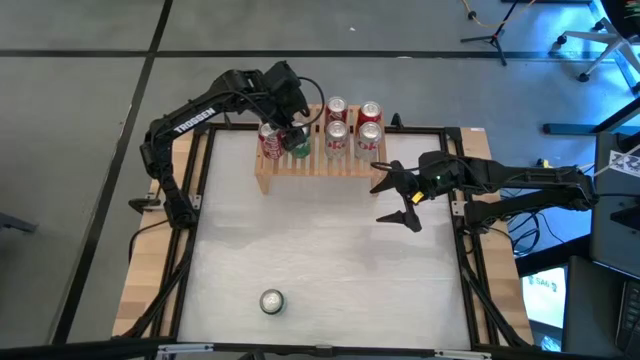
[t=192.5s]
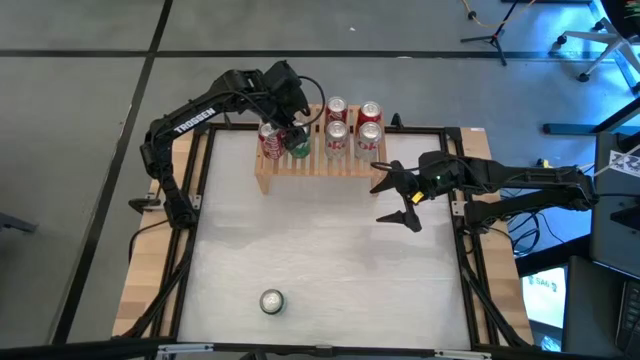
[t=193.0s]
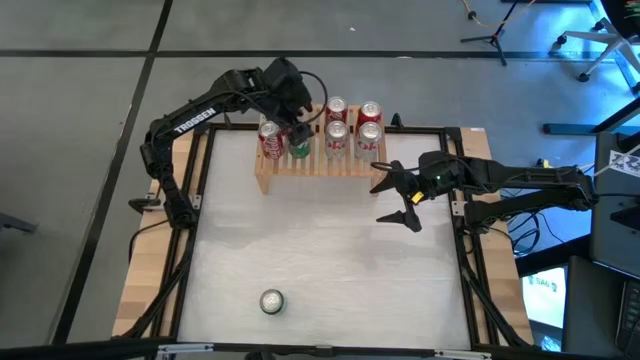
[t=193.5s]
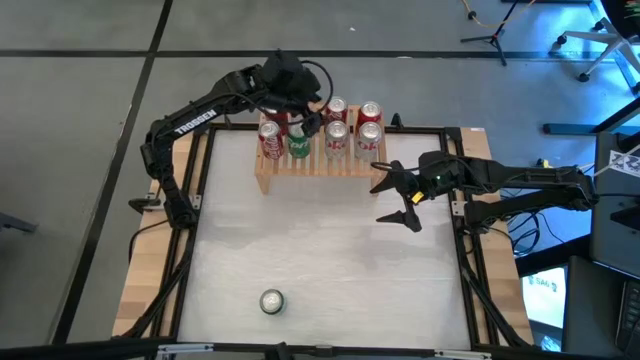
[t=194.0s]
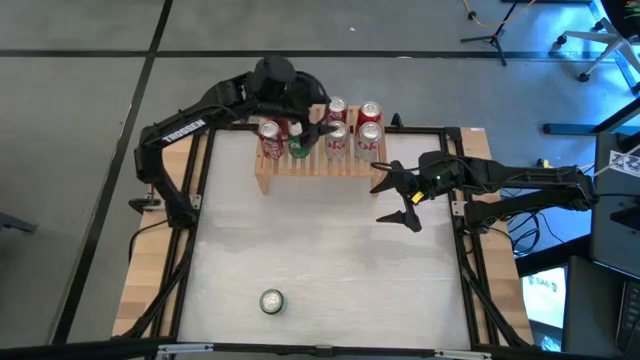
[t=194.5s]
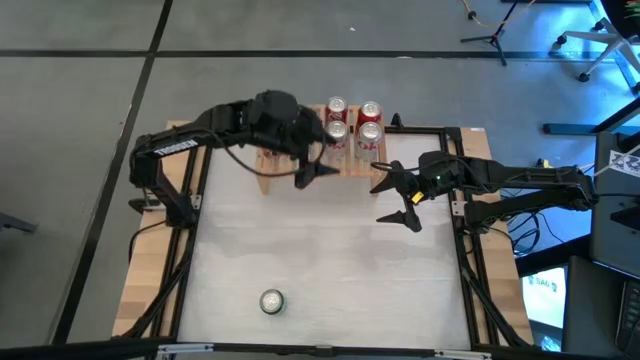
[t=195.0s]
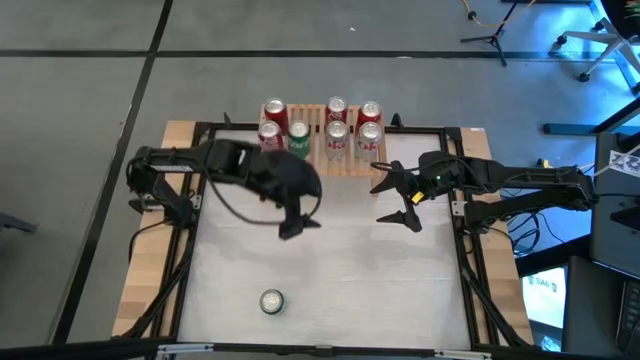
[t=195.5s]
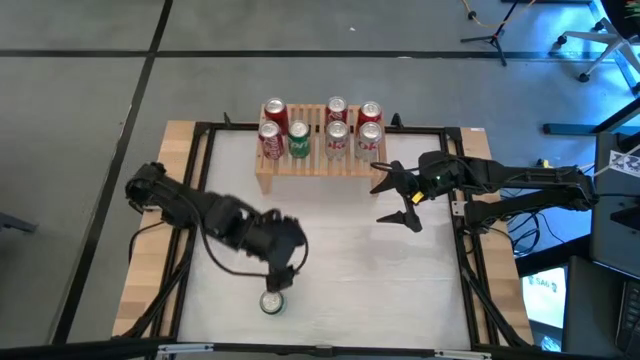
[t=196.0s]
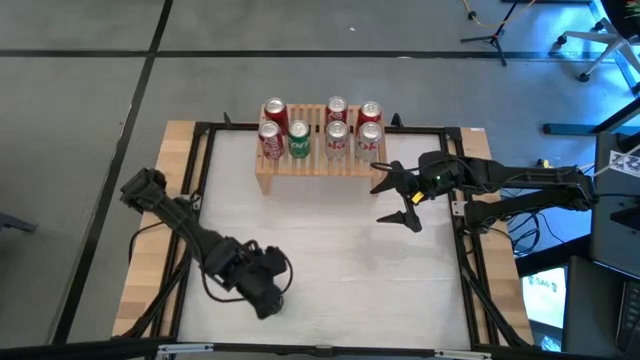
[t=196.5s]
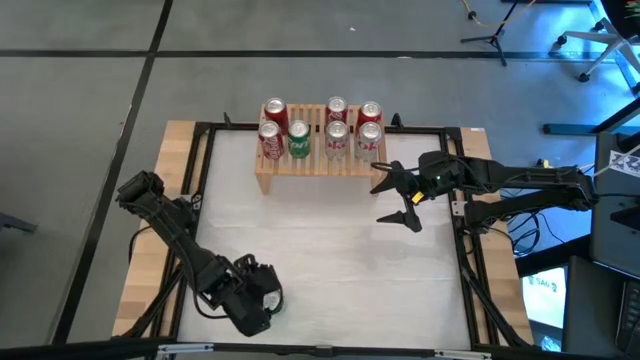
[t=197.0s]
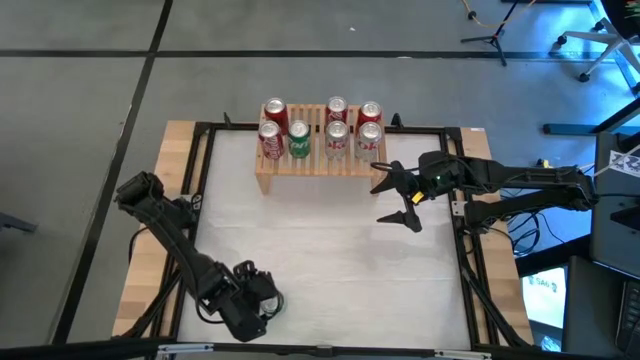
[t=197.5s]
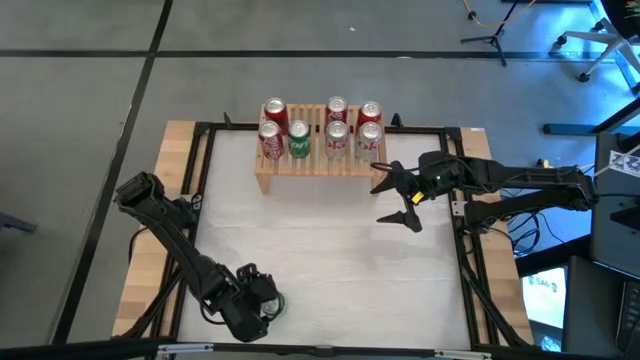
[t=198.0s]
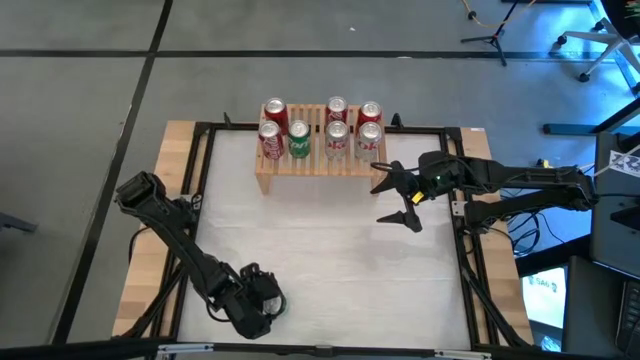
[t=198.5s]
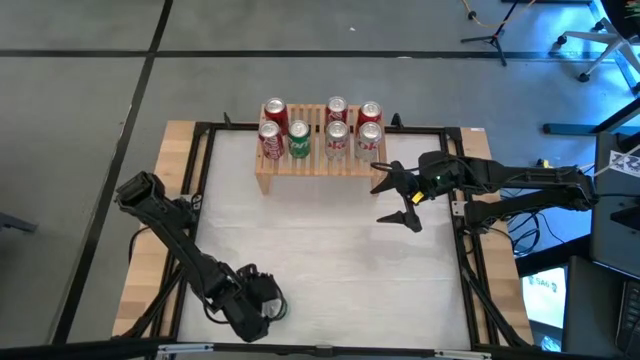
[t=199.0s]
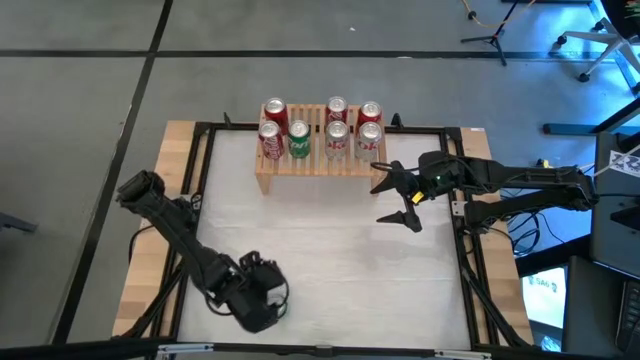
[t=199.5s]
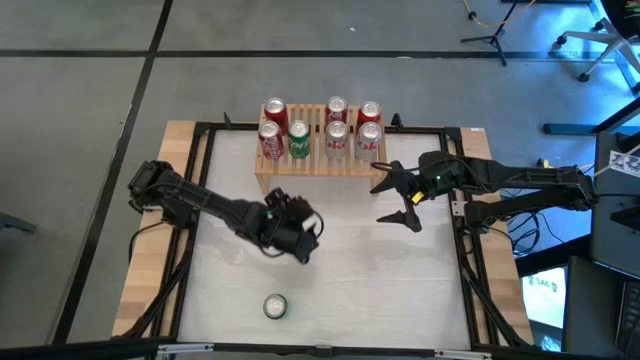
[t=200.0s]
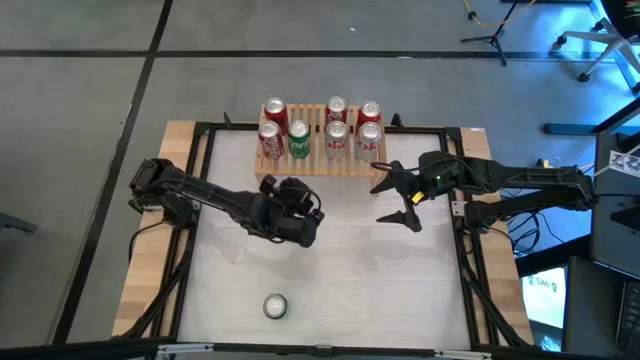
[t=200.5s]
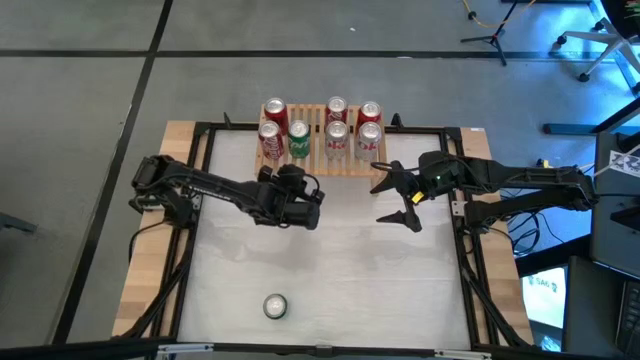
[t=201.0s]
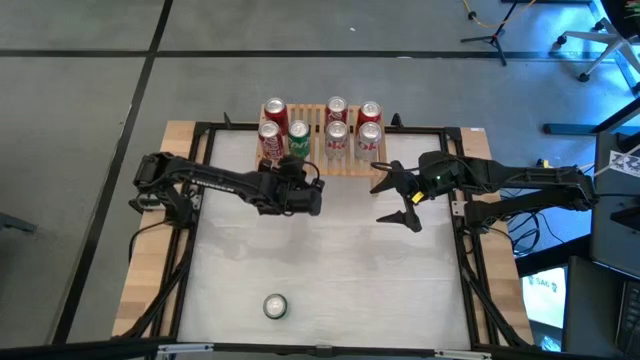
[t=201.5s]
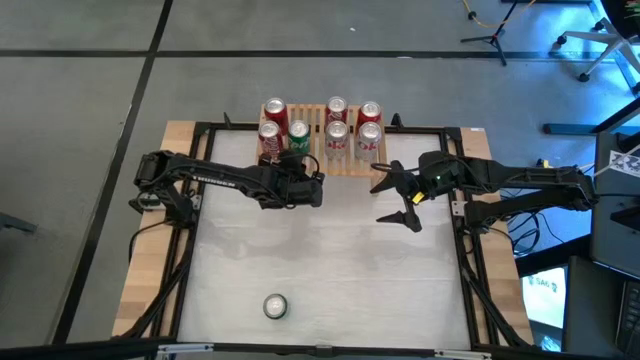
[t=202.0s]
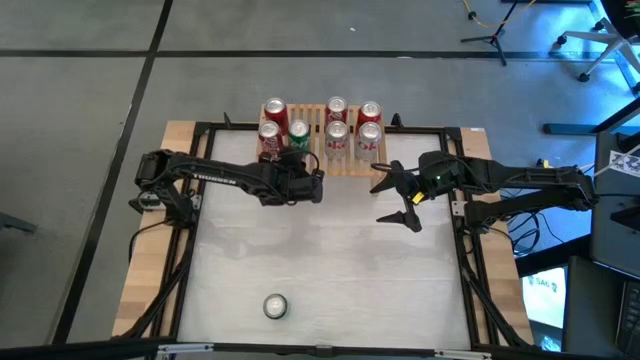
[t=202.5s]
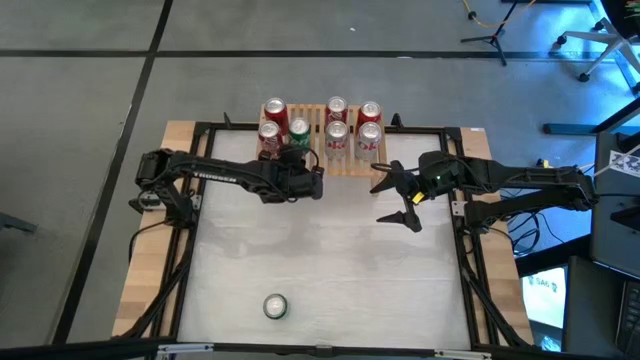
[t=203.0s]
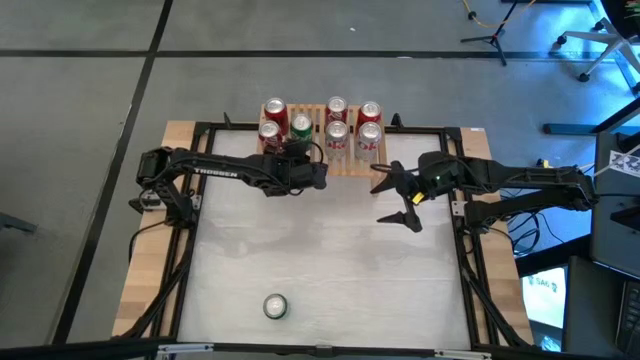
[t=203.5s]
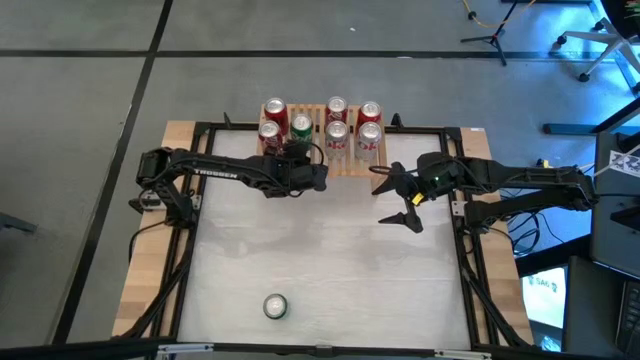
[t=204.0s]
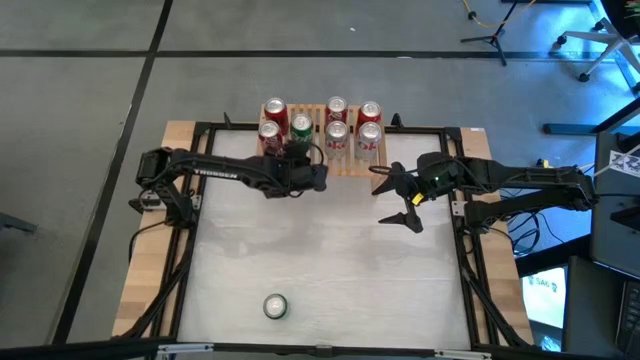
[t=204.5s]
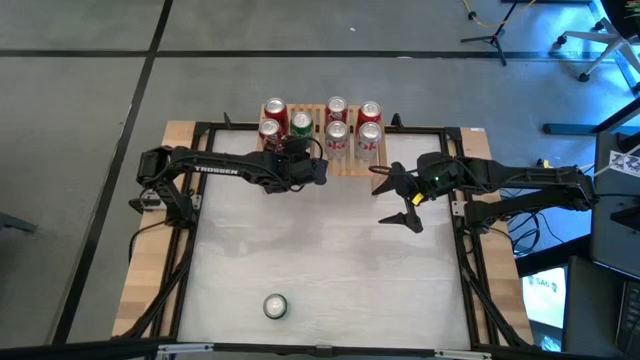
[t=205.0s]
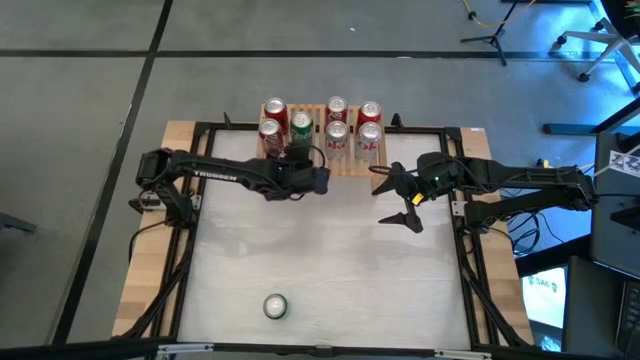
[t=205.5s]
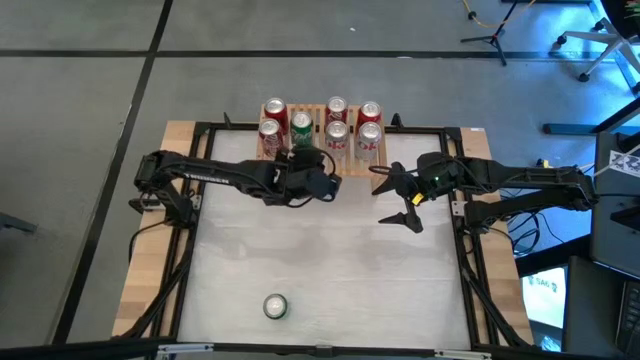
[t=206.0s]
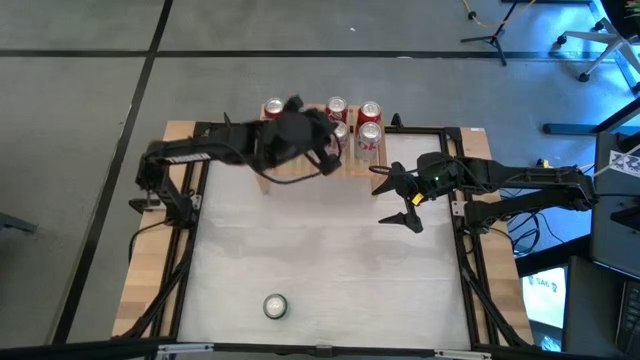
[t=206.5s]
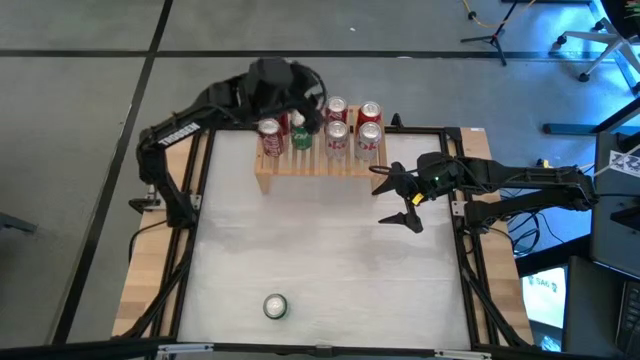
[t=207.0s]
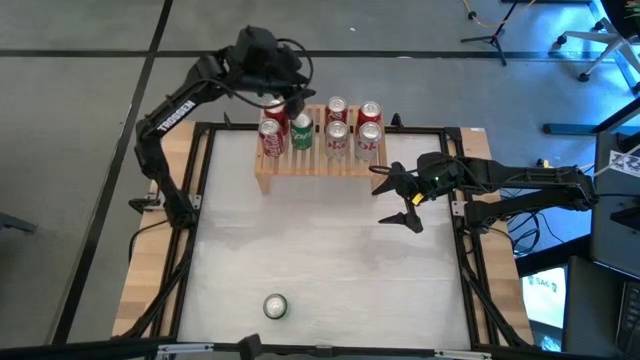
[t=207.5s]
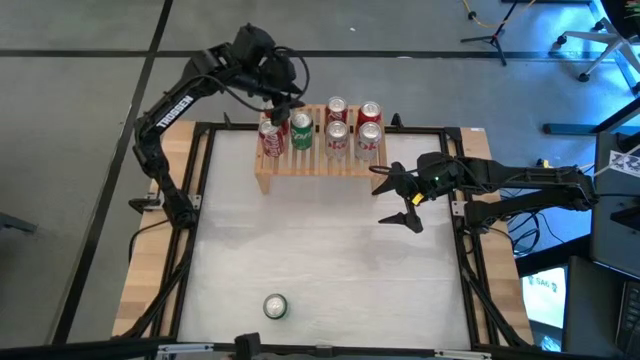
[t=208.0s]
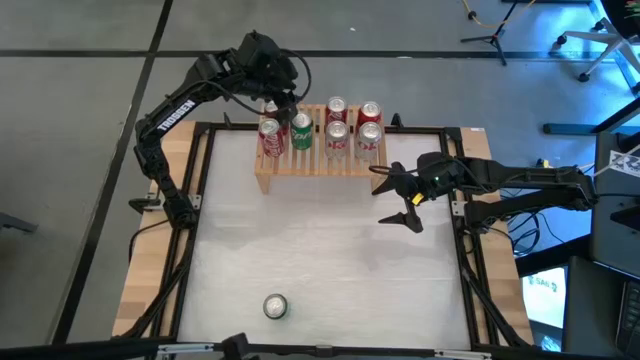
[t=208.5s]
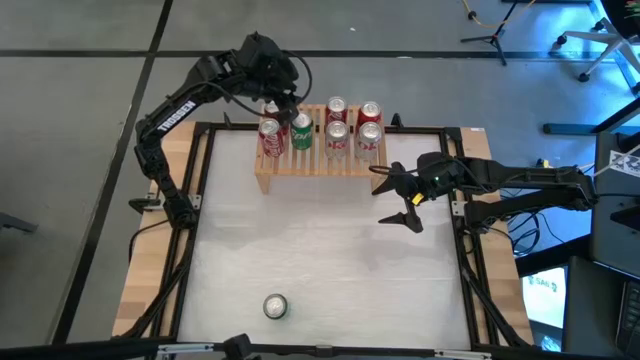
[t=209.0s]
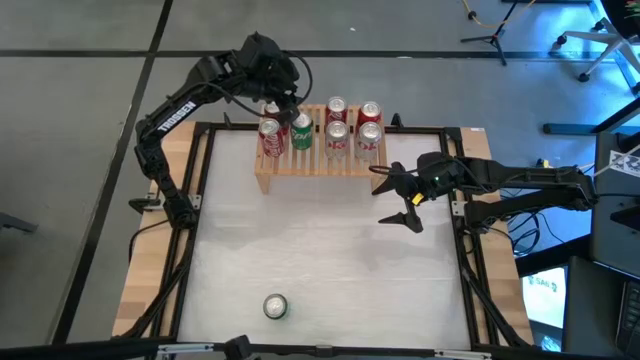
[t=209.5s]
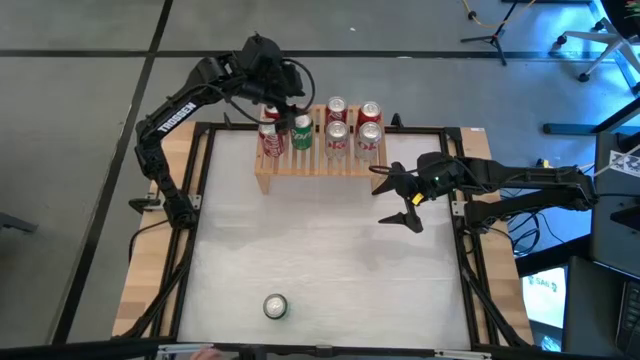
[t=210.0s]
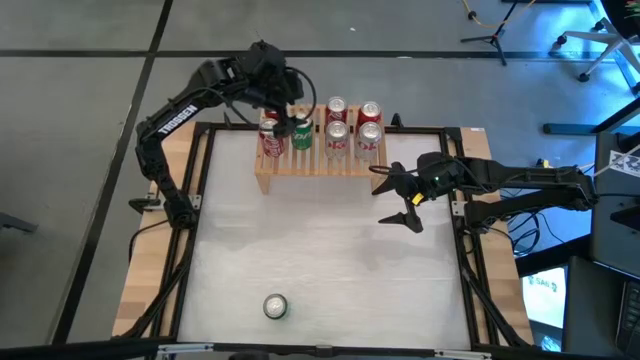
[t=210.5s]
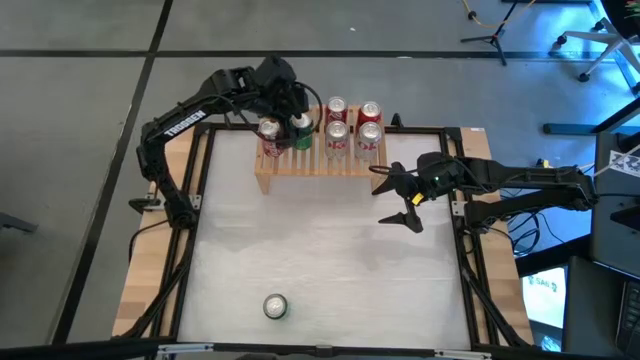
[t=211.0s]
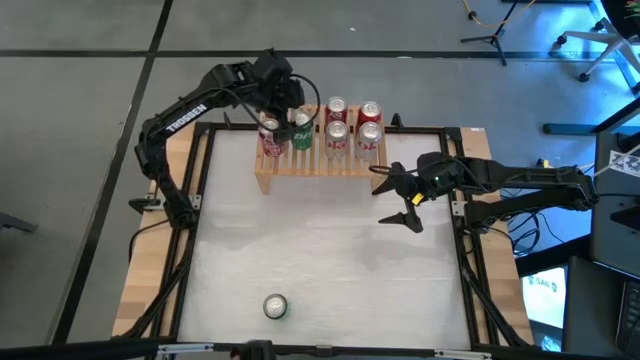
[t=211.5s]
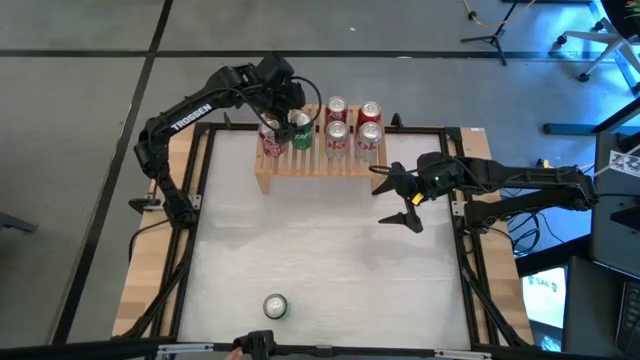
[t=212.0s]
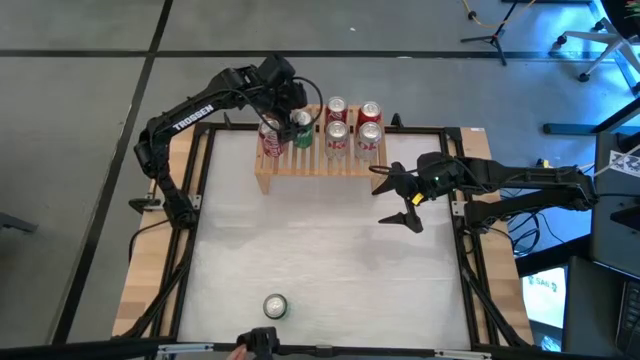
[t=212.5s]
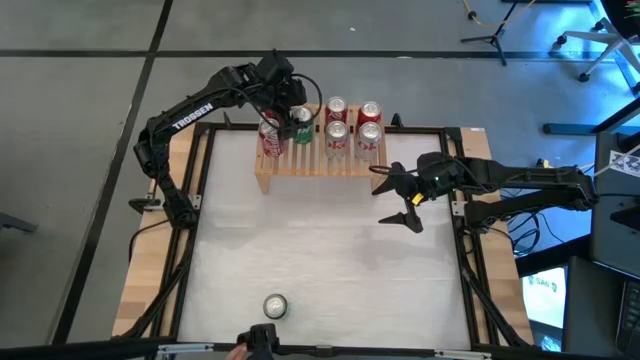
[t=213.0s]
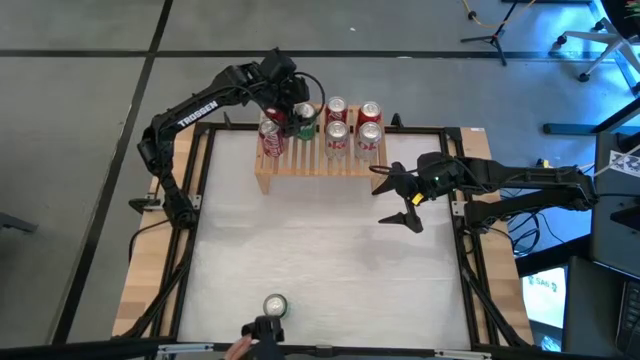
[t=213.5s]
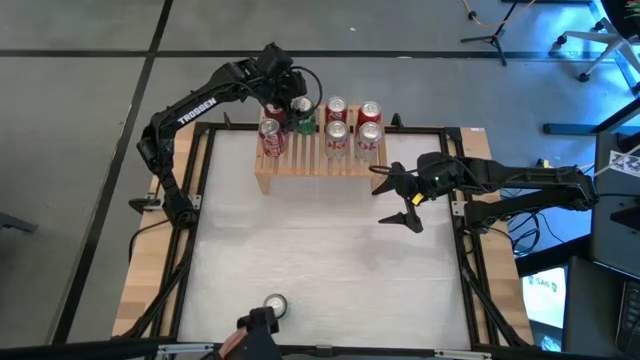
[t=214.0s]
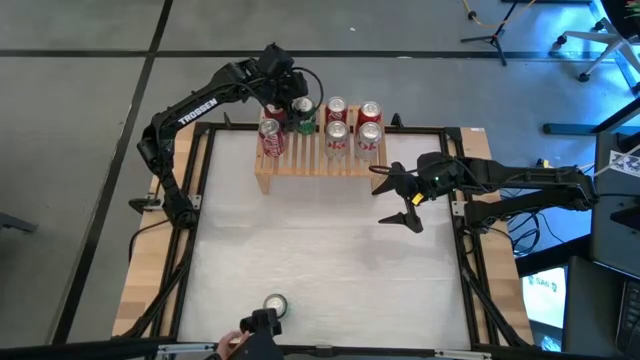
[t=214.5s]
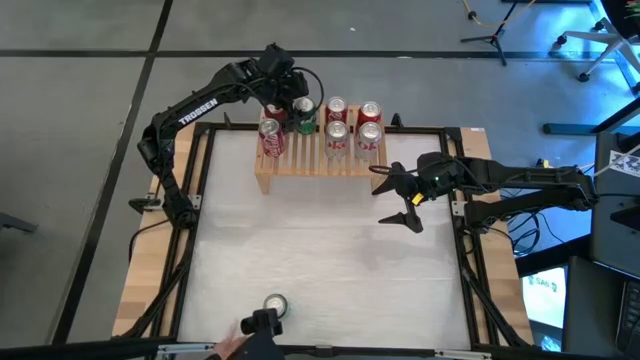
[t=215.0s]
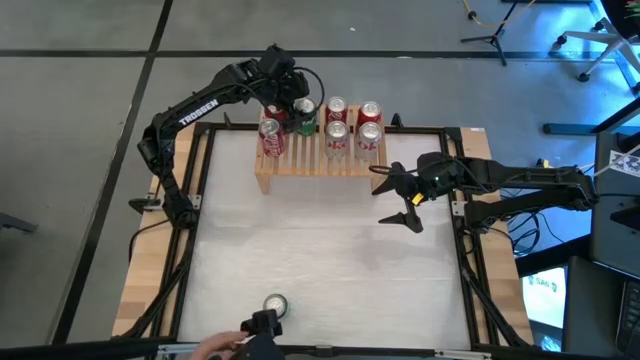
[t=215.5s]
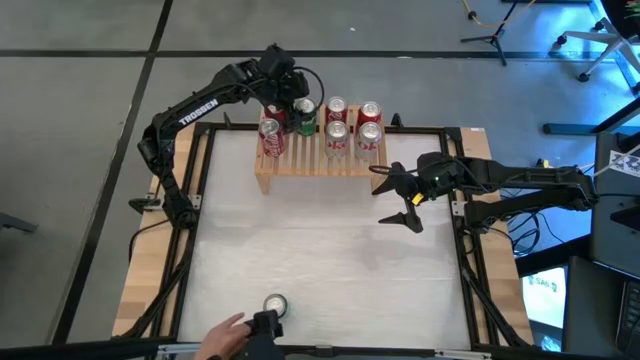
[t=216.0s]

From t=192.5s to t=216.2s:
Task: Place canned beverage on shelf
Adjust the green soda cans on the shelf
